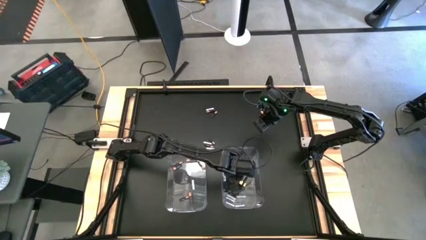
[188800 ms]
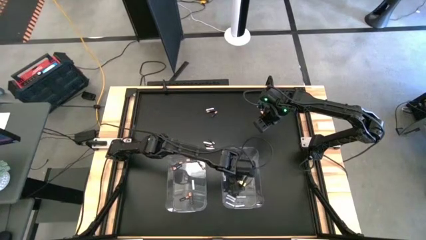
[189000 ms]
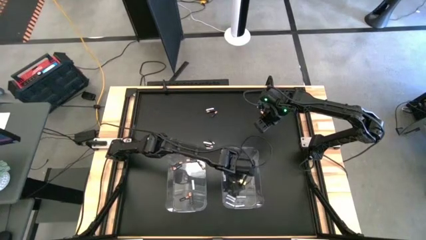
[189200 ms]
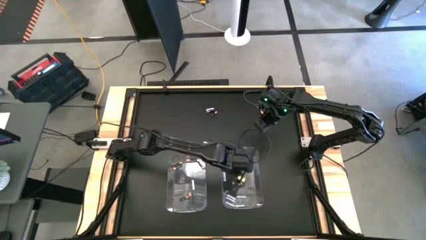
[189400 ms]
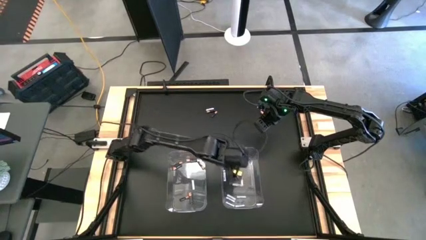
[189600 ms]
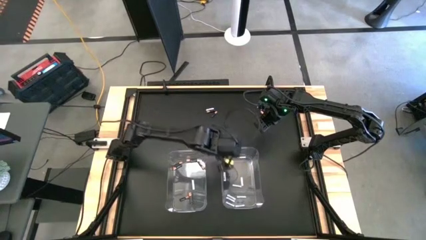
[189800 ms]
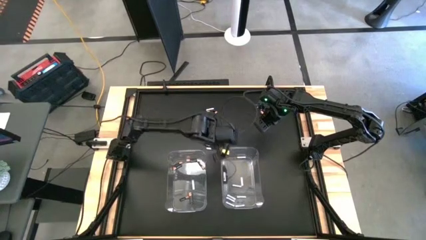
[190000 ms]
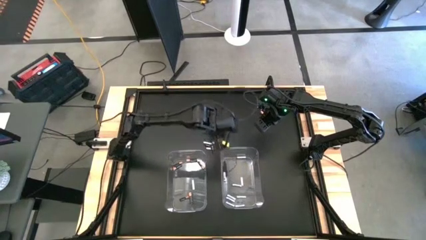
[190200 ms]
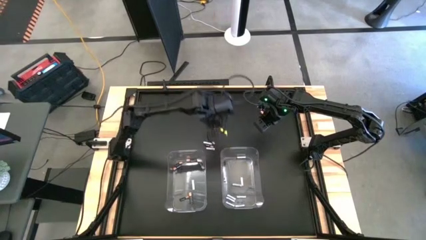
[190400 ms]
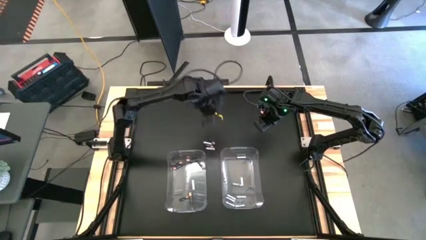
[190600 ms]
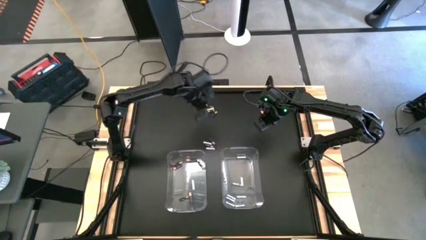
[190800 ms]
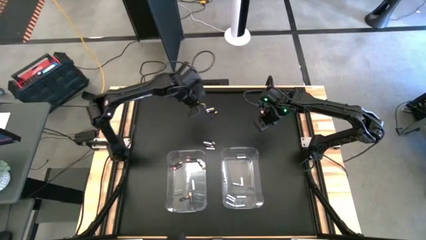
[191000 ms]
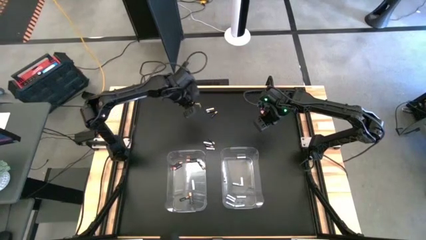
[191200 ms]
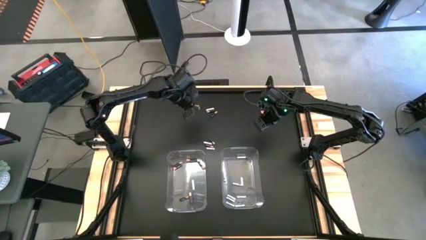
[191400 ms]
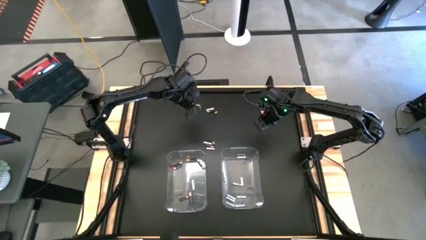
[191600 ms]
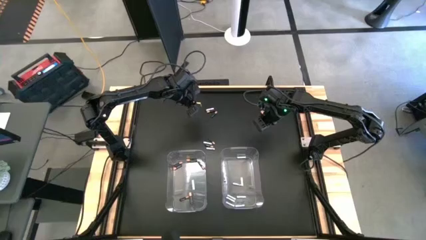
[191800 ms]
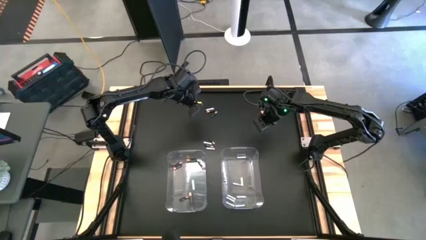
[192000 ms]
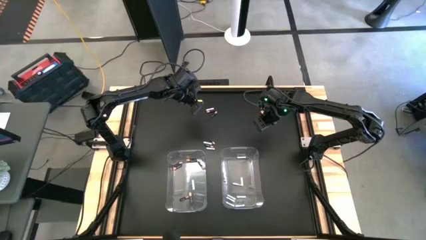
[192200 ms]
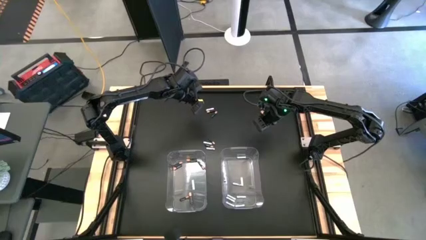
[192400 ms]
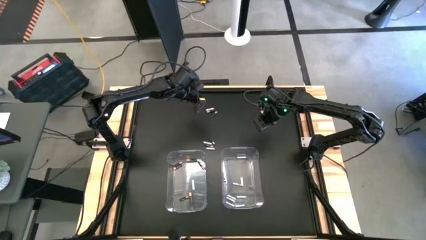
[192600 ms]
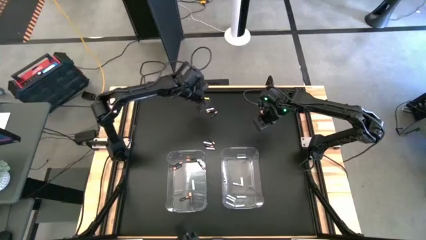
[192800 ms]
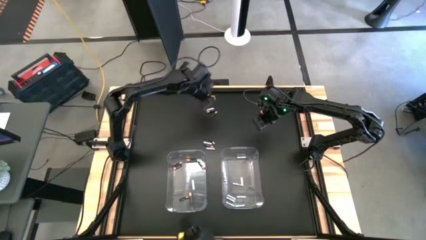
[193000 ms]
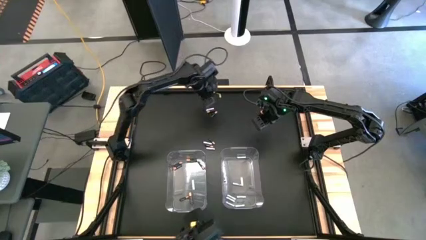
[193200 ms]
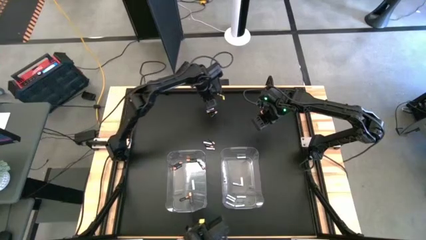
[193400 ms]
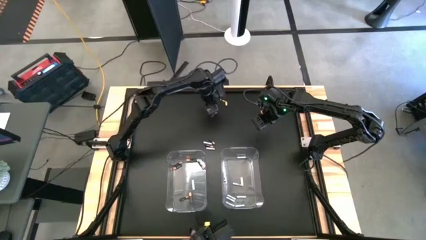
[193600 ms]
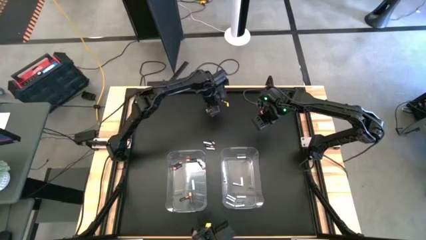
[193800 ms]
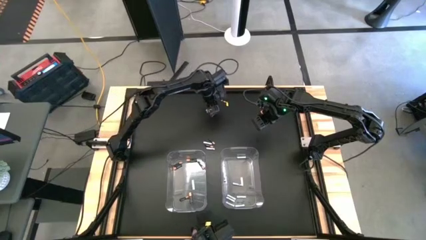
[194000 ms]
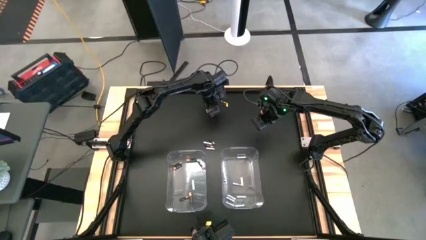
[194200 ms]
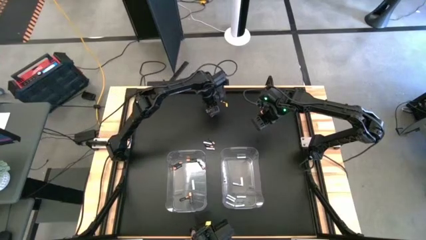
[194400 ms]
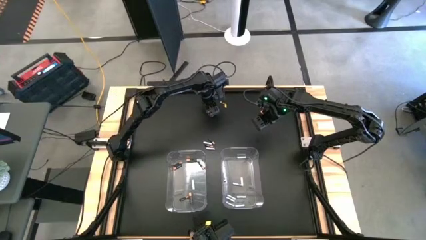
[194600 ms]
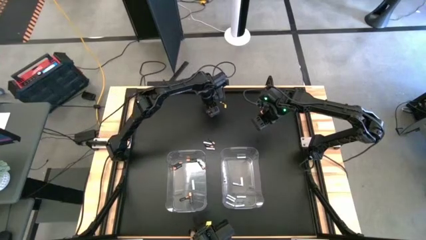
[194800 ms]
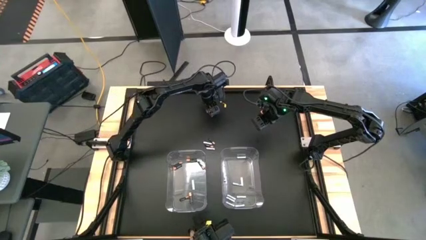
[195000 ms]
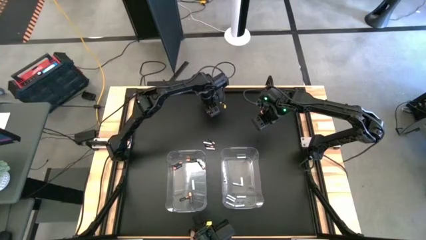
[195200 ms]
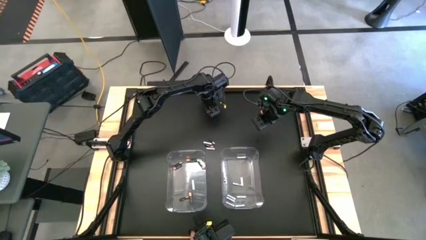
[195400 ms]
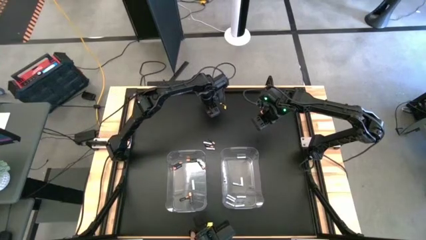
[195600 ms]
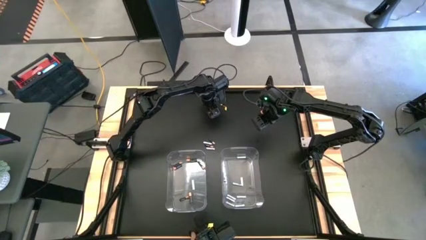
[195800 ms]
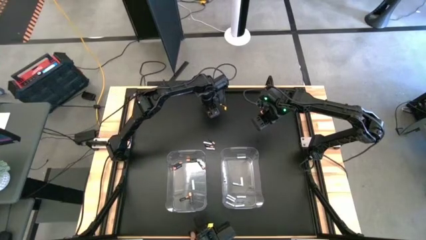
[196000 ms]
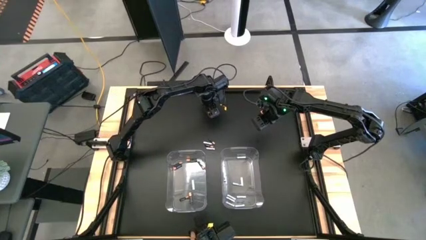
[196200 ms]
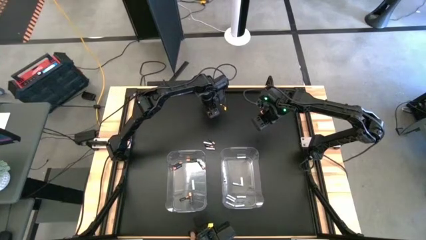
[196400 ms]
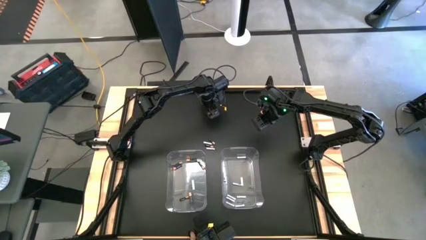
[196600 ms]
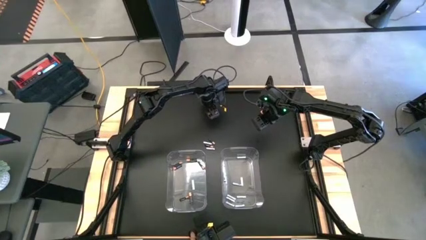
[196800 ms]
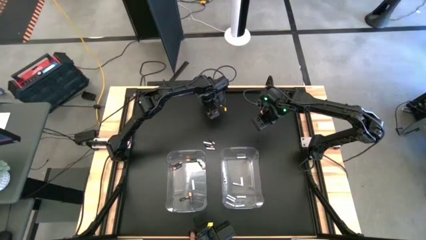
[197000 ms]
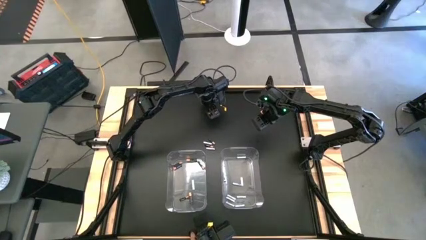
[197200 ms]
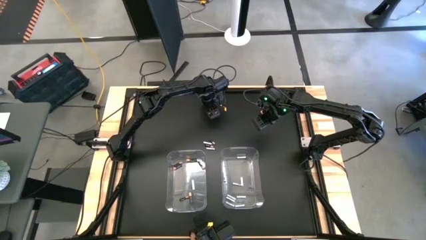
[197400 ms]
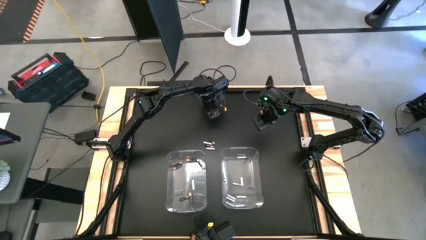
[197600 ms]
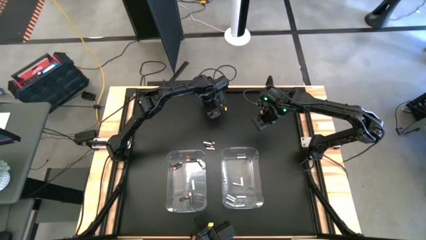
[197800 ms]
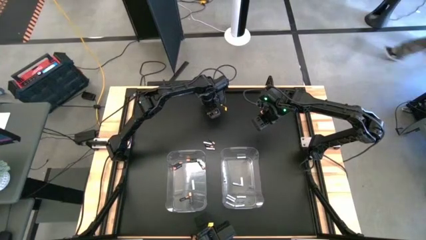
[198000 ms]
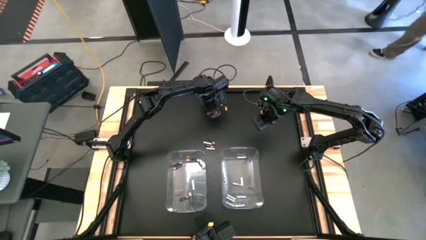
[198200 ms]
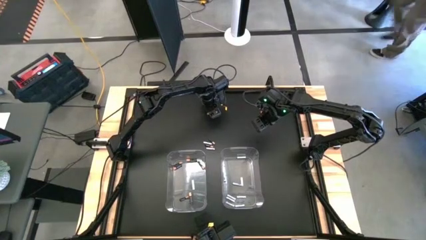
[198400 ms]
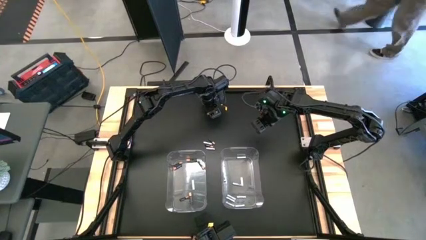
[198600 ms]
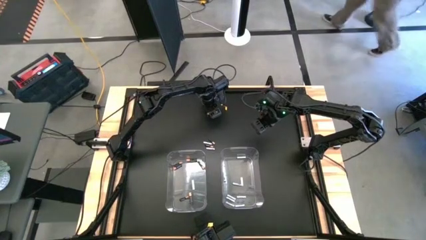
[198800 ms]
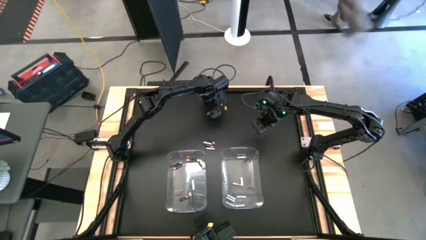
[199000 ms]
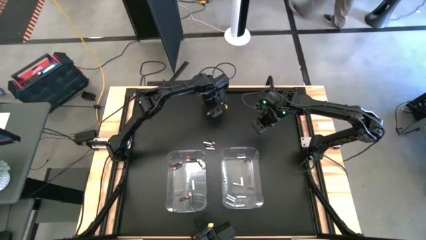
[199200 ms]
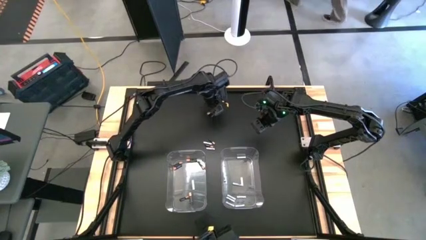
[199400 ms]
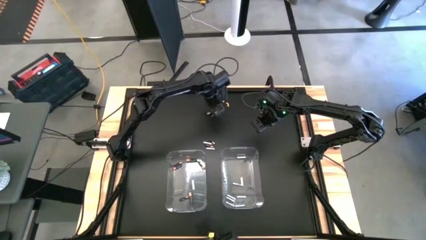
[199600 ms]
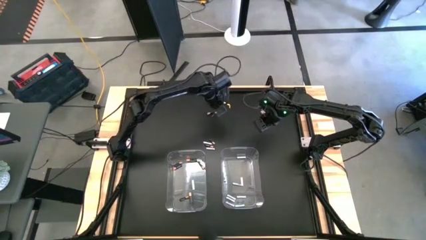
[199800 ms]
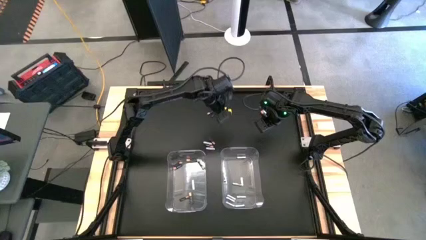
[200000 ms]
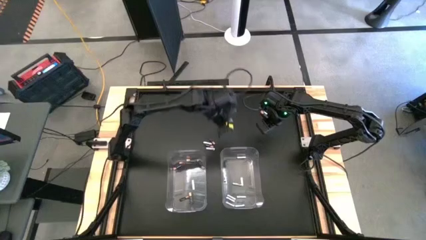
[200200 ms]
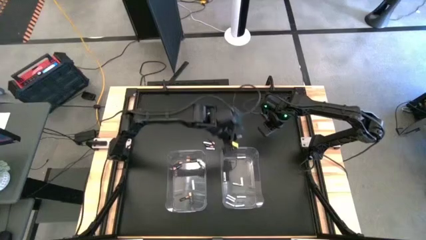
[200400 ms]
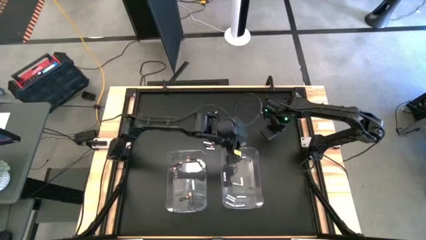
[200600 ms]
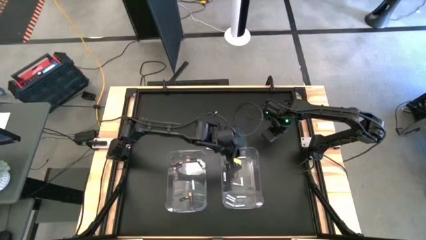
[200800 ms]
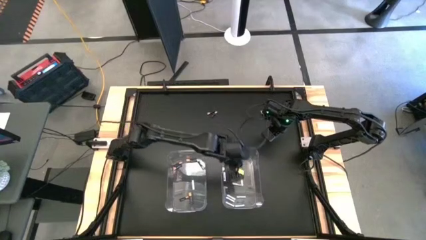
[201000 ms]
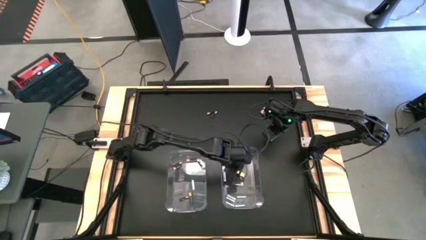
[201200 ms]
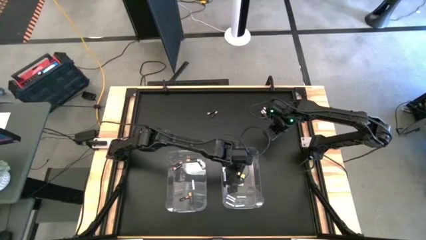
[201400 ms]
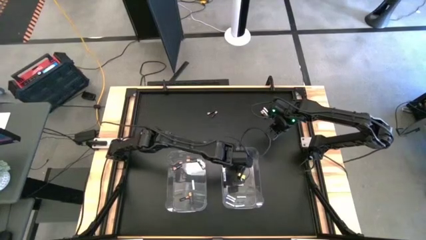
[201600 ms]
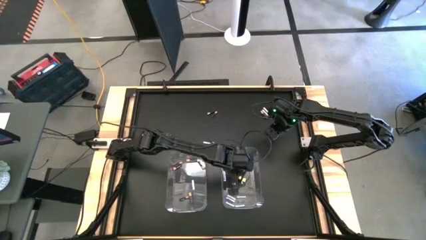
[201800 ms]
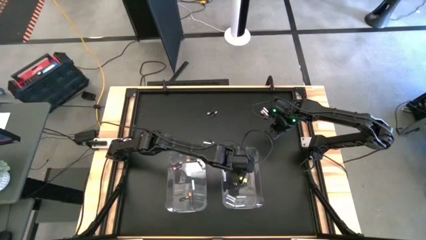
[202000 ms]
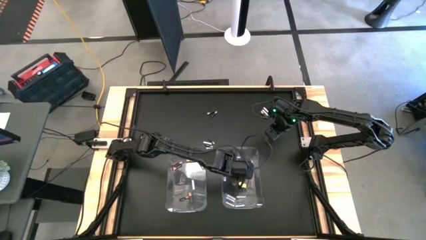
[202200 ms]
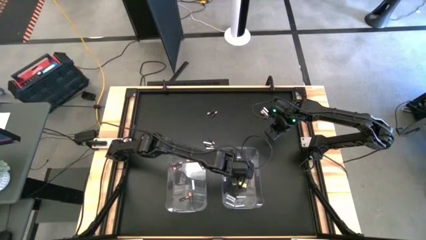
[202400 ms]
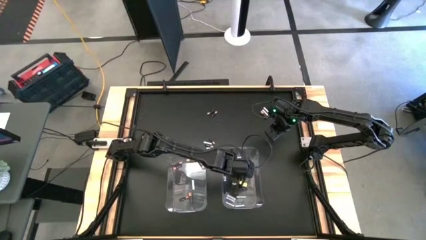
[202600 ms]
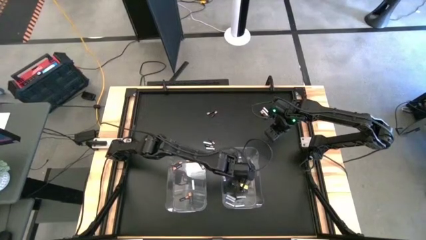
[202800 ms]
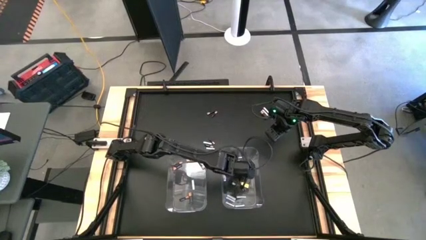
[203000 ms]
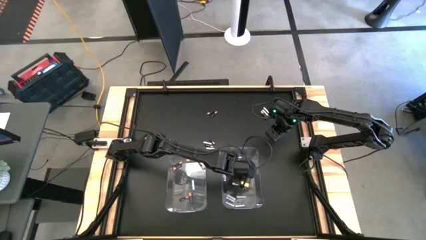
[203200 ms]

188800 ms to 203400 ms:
Task: Sort batteries
Put the white battery into the right transparent bin
